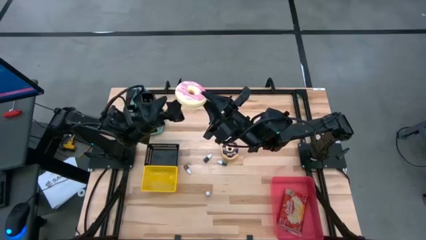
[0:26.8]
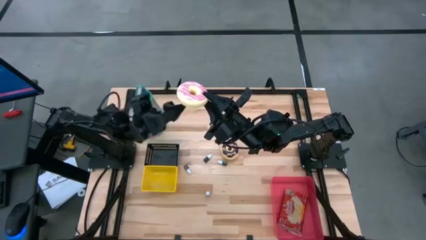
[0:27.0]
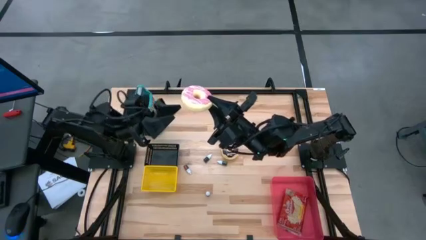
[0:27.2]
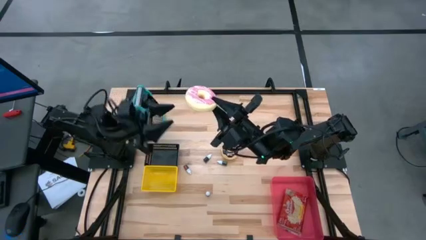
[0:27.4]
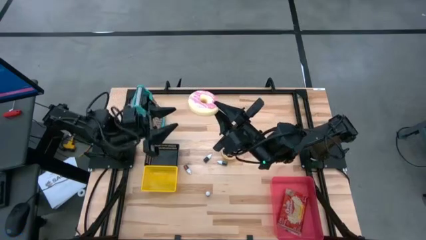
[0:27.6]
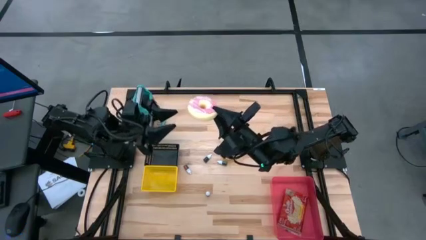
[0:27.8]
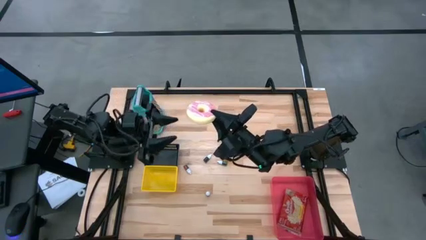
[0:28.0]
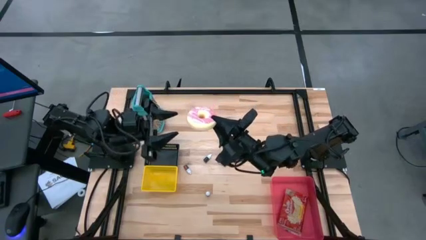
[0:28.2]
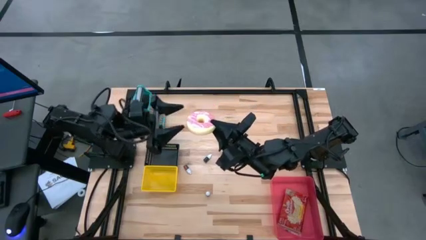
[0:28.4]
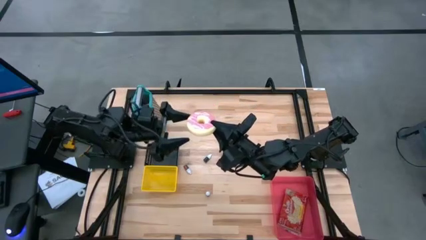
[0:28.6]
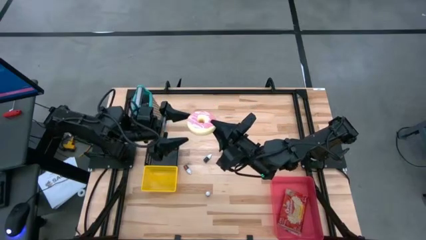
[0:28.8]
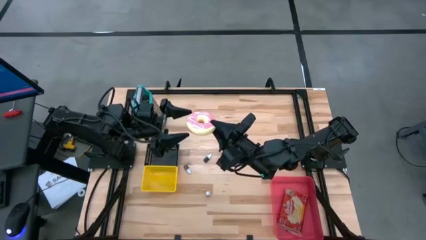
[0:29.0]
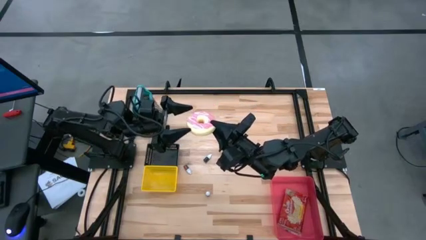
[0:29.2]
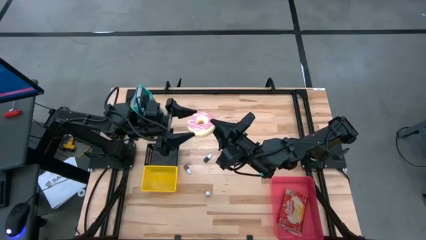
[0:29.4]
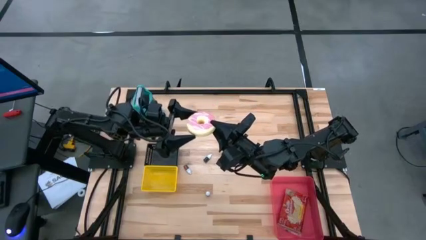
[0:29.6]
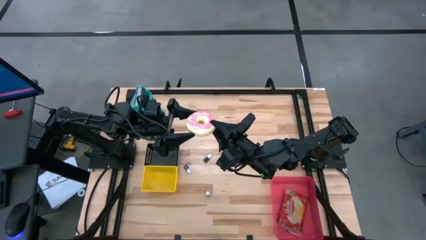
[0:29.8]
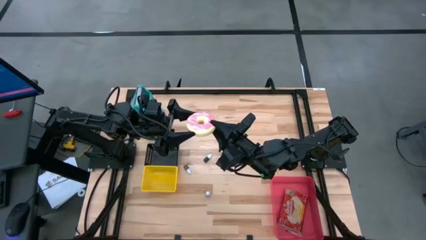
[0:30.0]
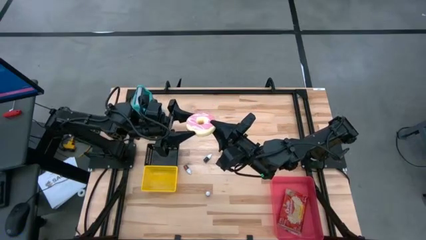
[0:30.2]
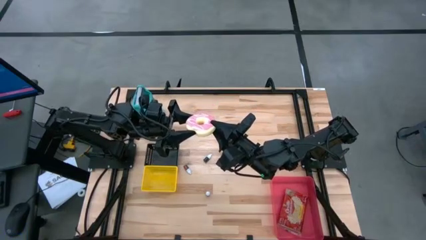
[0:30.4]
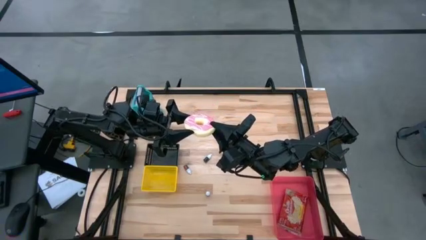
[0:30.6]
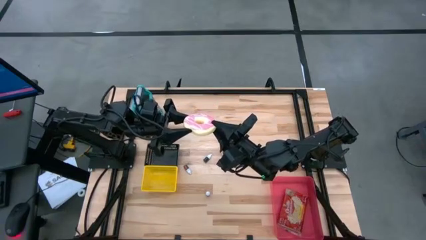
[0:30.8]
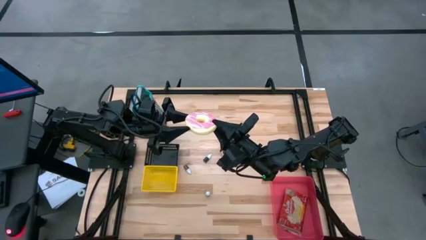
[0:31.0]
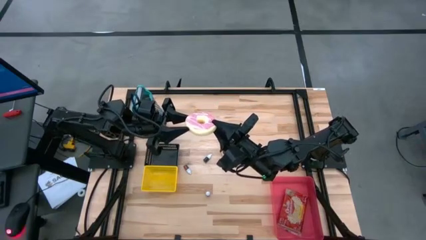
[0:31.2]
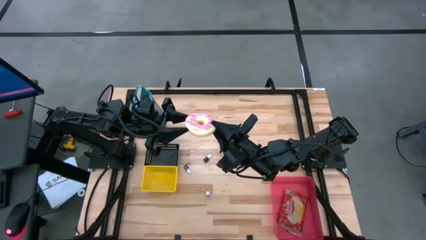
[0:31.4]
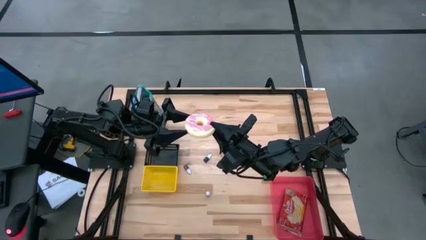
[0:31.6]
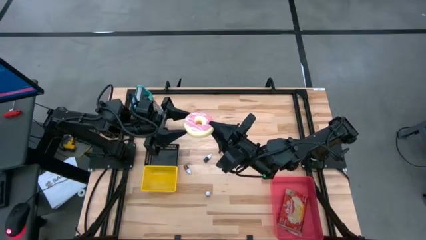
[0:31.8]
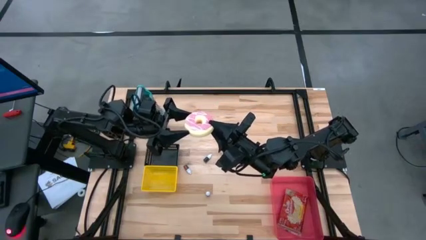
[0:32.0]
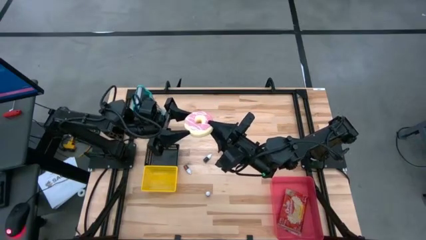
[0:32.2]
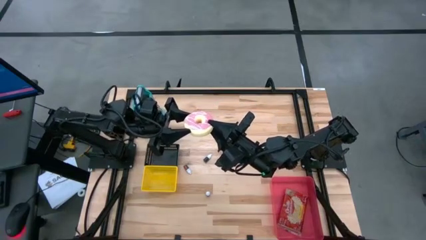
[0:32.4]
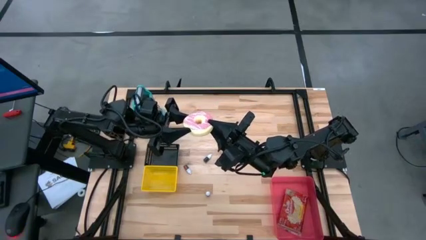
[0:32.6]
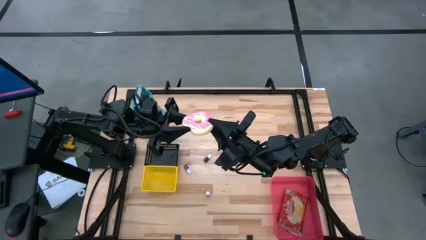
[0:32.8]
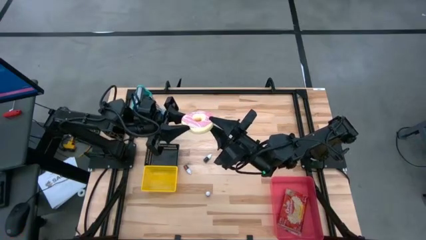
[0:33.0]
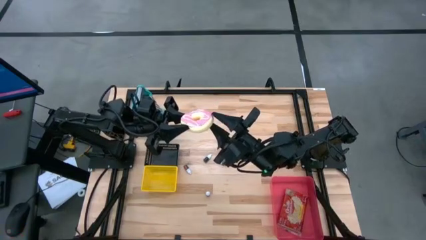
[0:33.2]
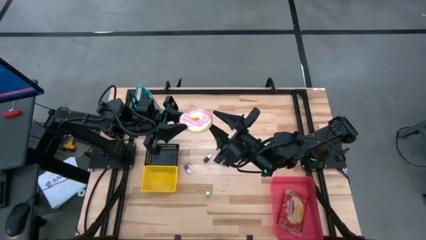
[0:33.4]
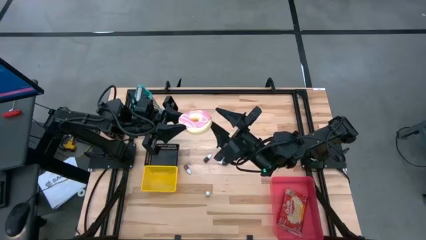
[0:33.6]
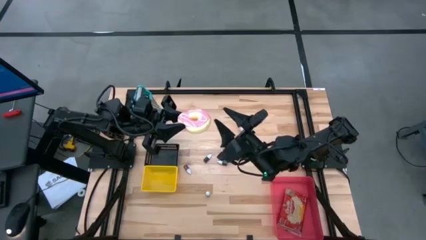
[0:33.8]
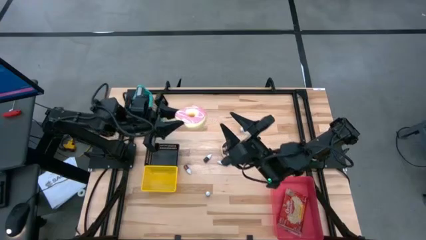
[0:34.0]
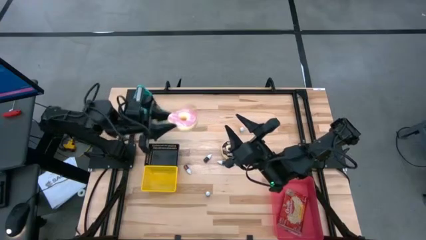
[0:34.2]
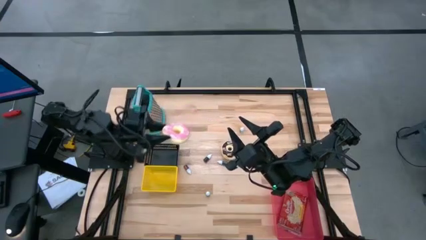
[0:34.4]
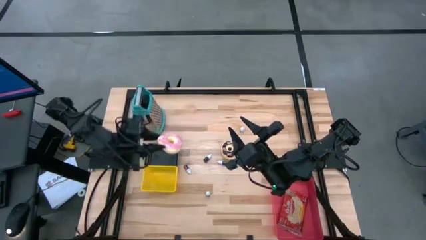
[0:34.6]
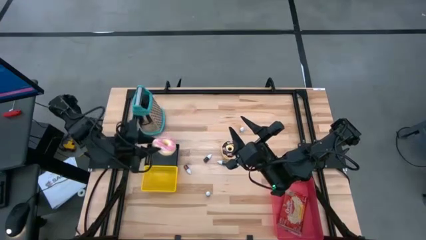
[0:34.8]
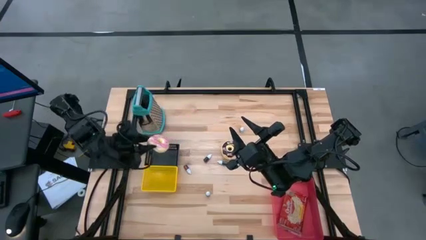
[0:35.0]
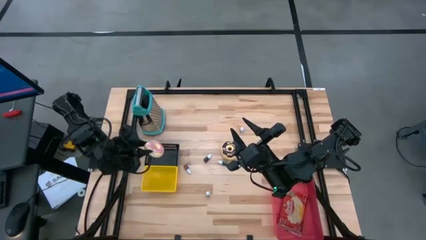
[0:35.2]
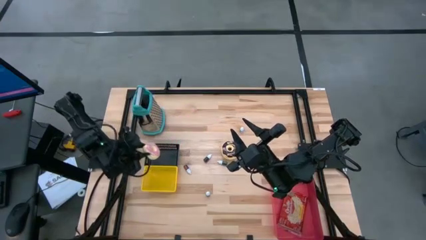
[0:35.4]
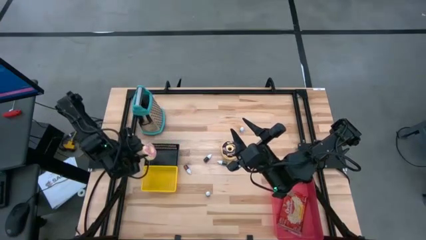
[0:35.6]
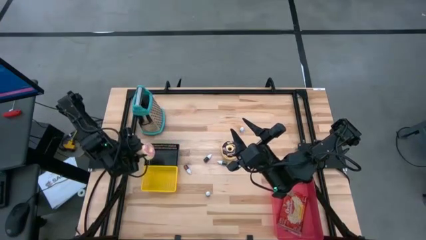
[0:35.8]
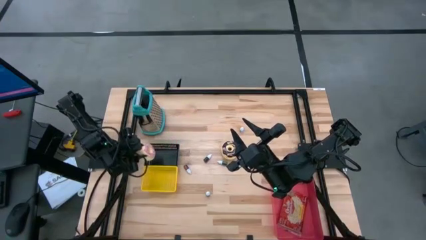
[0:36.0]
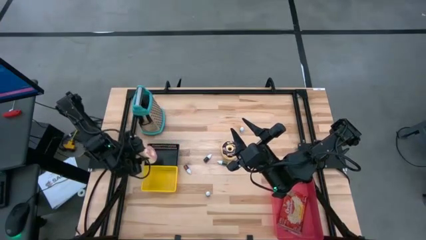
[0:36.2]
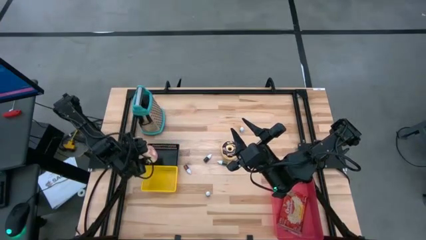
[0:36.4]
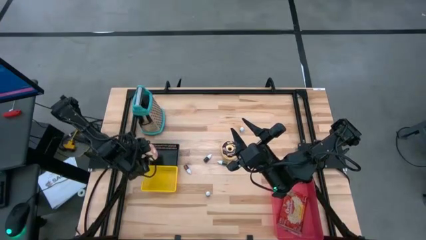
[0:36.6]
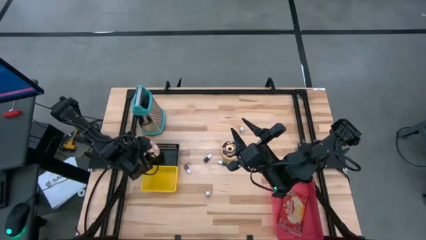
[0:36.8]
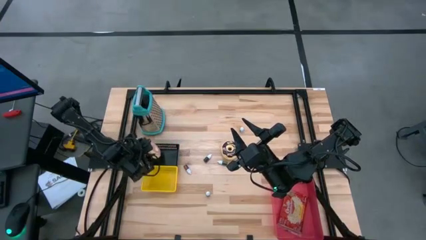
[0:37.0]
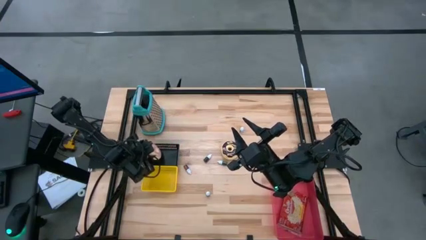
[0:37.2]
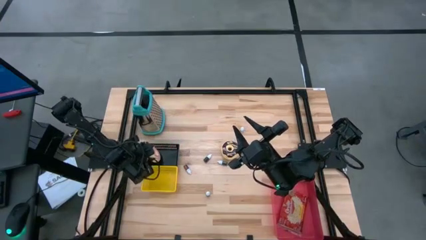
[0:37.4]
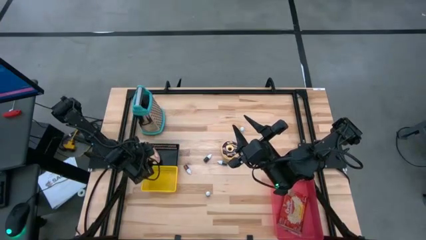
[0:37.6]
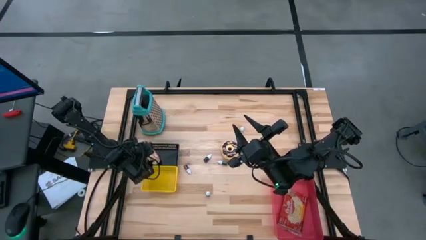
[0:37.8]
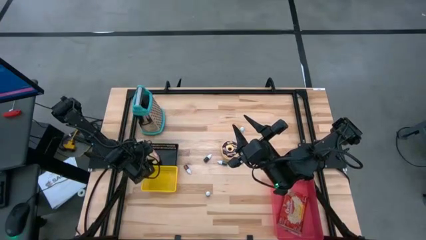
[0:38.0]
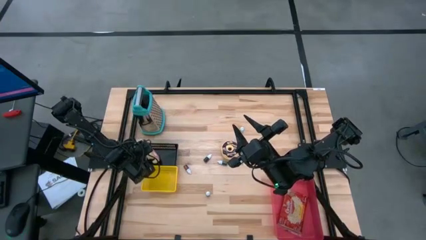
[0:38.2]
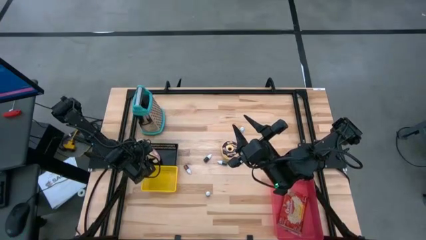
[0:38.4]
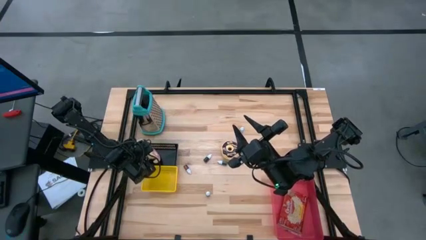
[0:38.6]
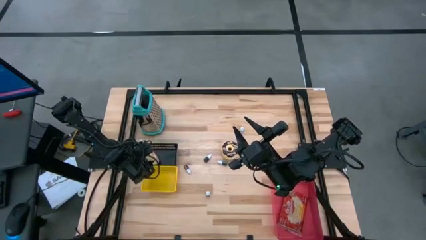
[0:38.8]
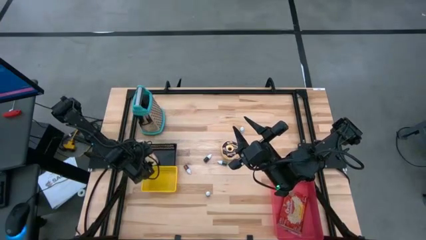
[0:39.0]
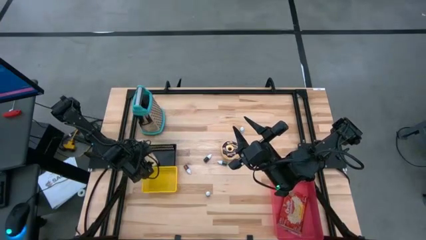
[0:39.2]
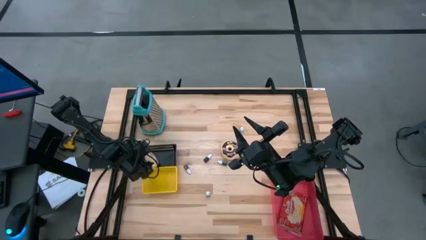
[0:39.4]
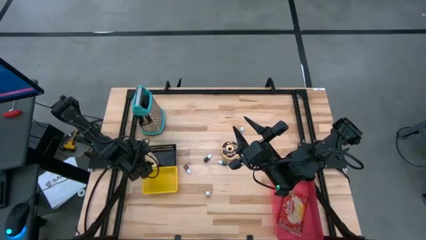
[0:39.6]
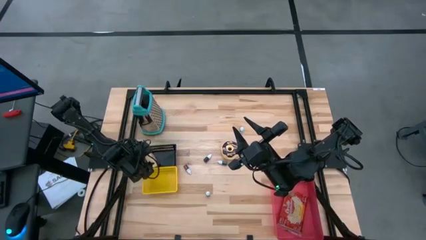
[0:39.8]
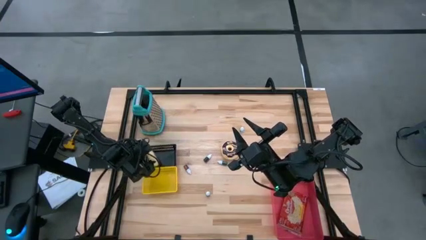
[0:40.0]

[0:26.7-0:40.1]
Put the pink donut into the black bin
